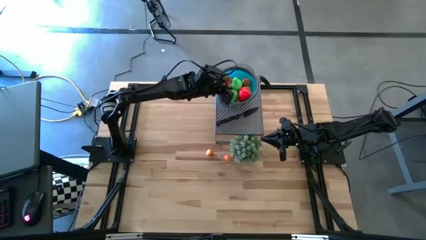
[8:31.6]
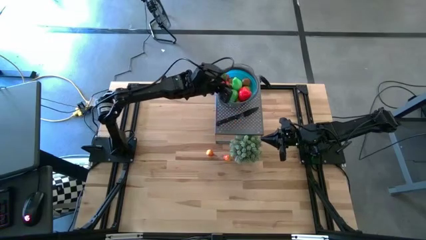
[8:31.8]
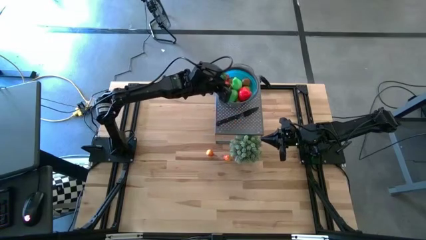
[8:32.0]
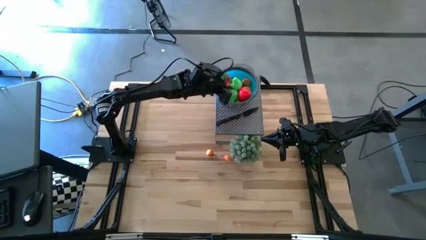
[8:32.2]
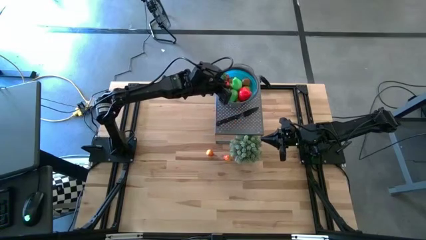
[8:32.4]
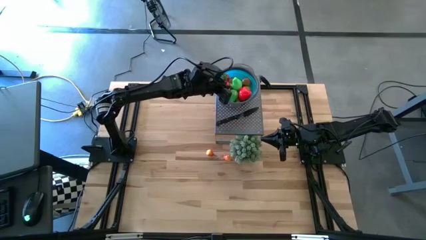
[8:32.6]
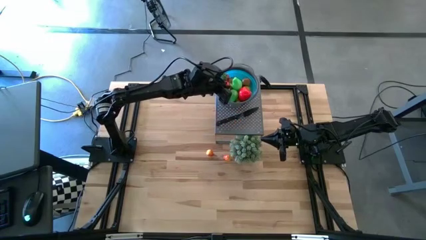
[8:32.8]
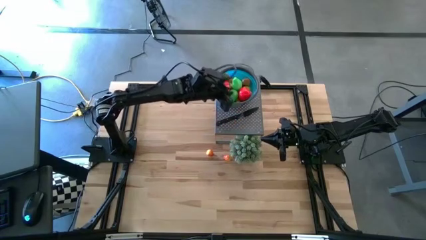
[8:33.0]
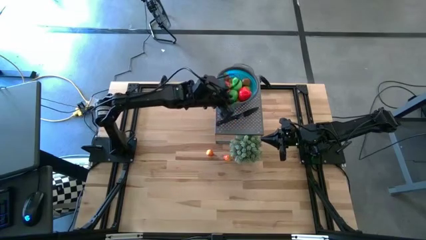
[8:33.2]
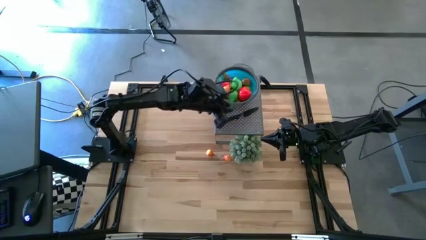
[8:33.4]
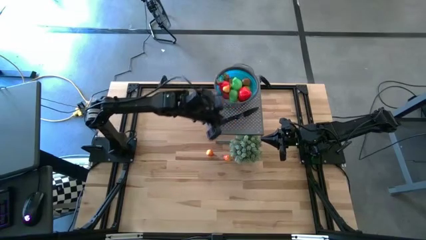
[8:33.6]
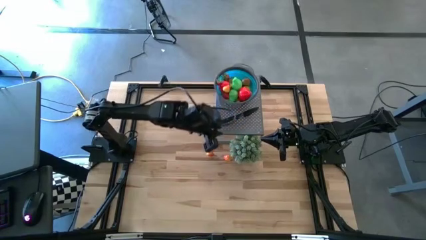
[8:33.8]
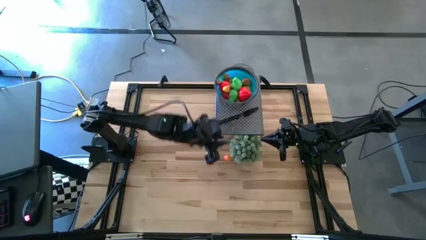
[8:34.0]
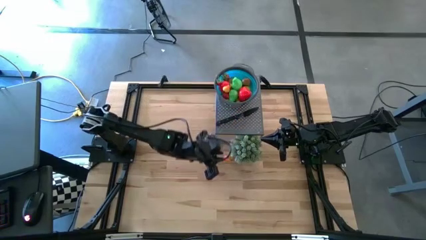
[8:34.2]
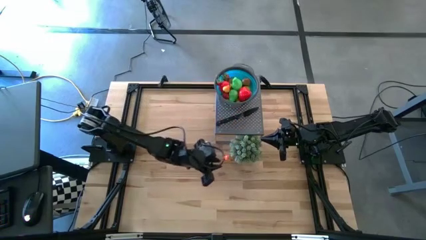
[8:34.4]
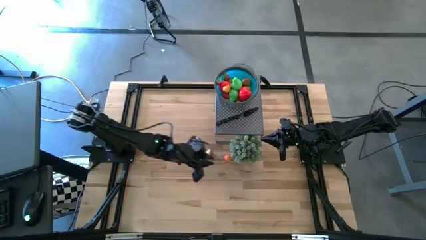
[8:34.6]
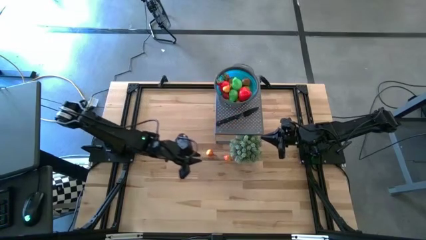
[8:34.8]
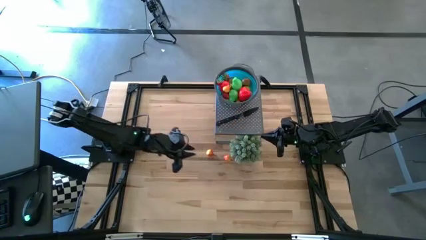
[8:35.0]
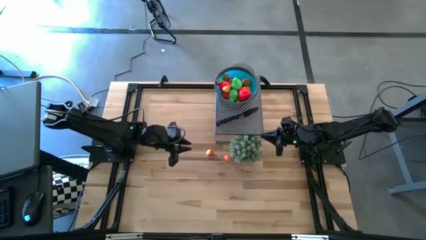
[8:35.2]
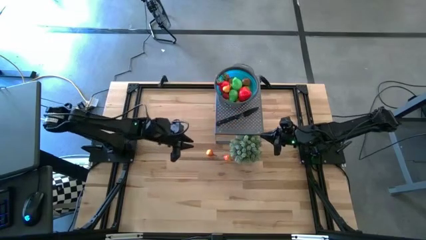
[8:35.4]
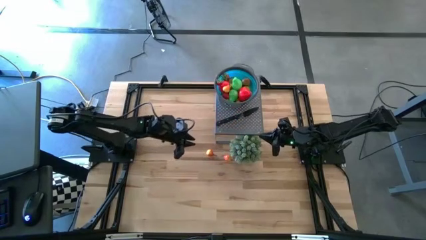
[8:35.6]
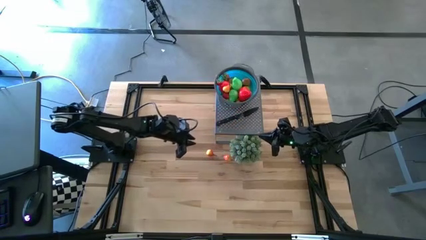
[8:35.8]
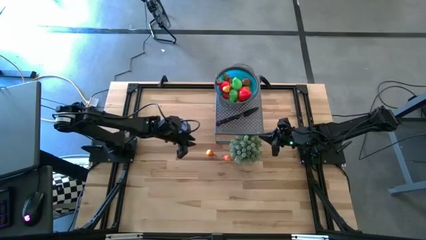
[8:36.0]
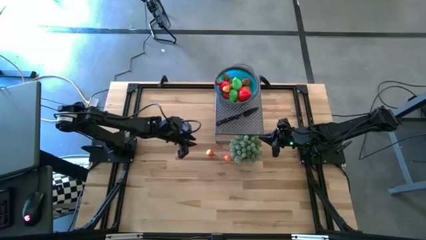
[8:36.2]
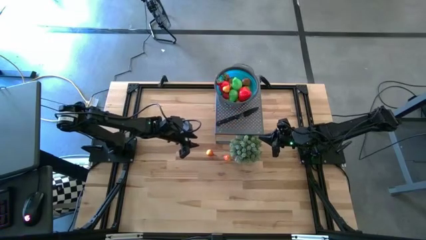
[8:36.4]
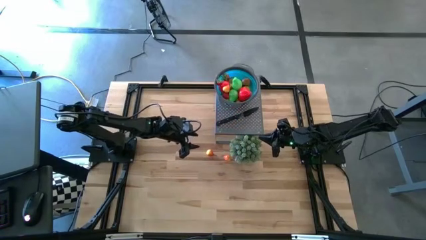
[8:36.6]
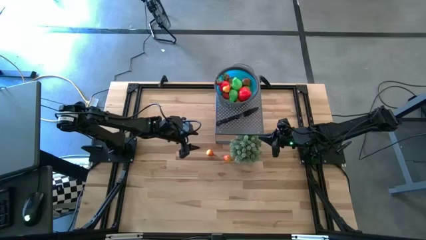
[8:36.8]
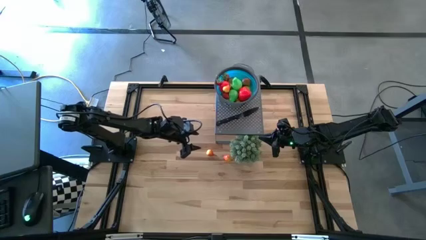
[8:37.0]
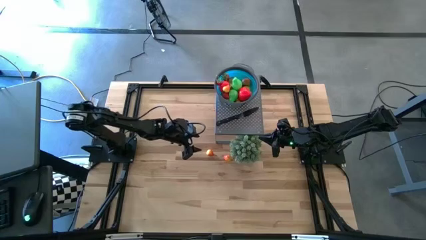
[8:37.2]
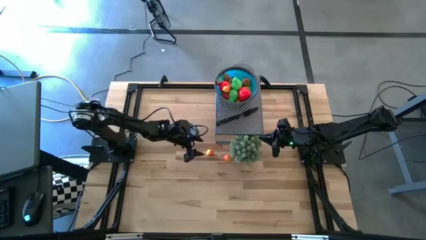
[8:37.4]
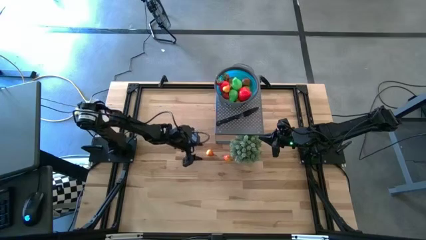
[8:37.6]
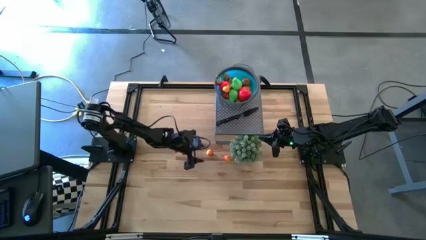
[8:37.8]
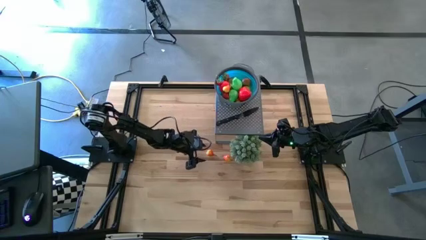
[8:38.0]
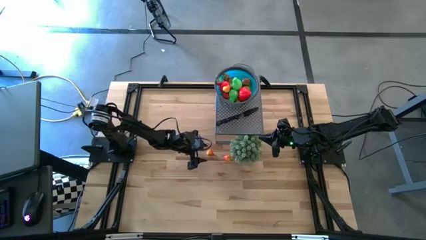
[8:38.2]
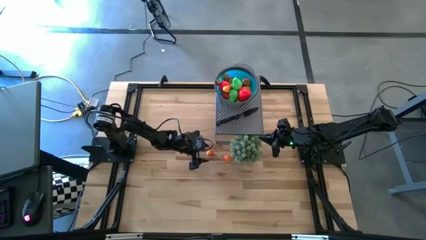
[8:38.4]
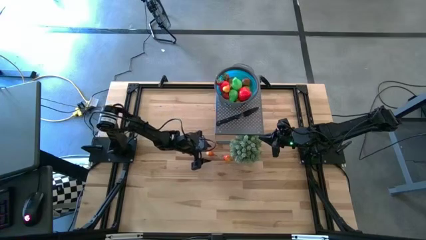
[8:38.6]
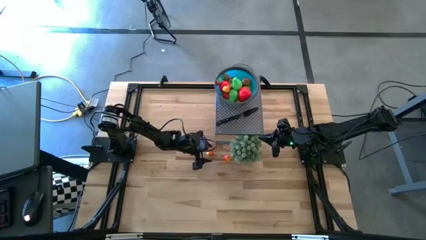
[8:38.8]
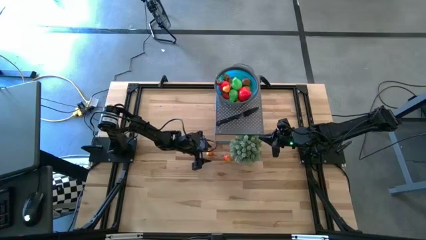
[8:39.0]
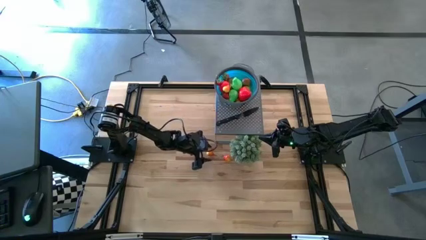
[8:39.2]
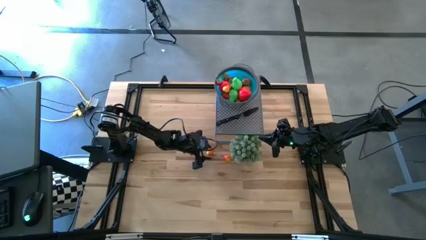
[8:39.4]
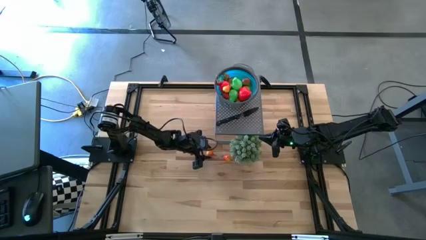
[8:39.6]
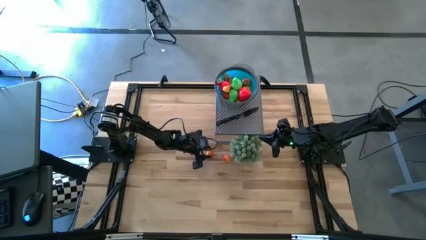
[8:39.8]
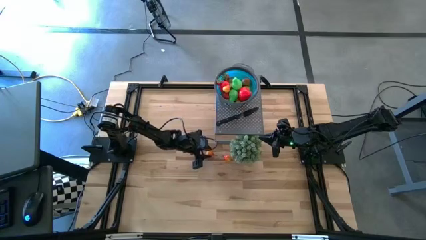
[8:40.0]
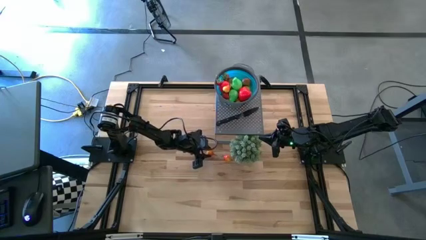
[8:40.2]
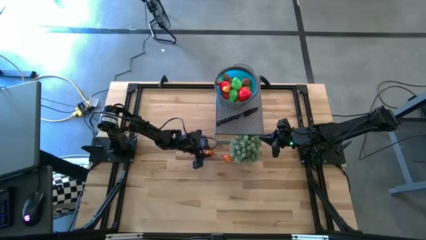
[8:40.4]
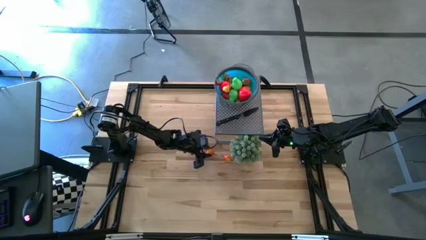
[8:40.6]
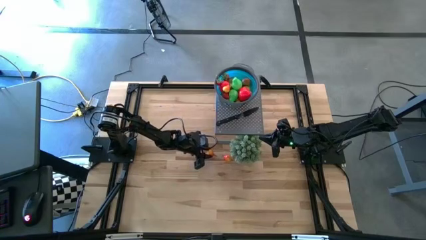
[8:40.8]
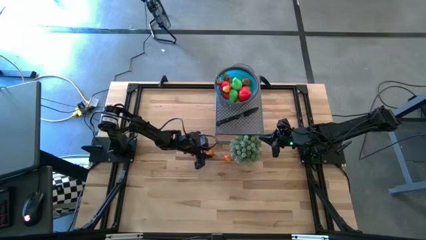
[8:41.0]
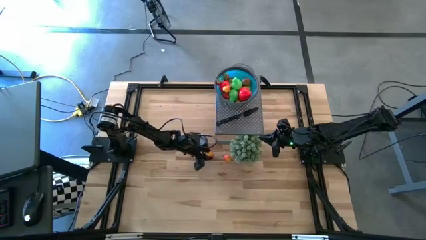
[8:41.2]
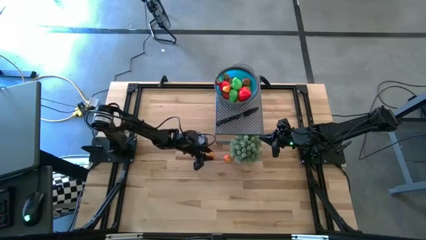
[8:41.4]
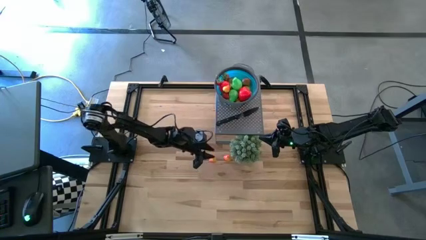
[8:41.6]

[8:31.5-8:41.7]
Task: Pick & Place Fruit
Put the orange pear into the blue strainer bowl

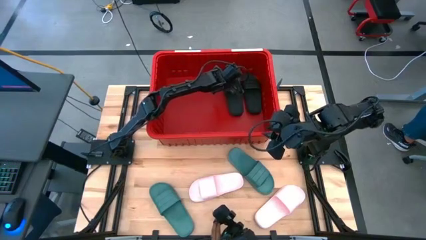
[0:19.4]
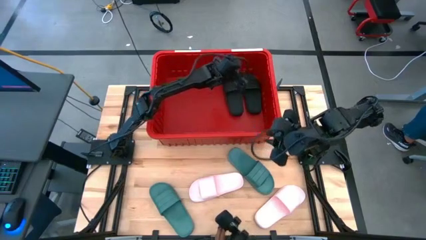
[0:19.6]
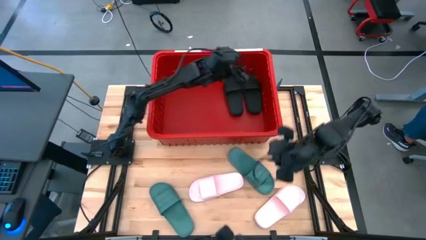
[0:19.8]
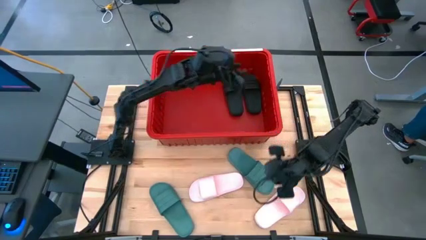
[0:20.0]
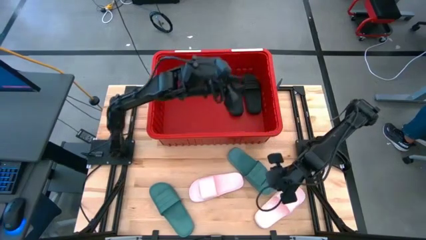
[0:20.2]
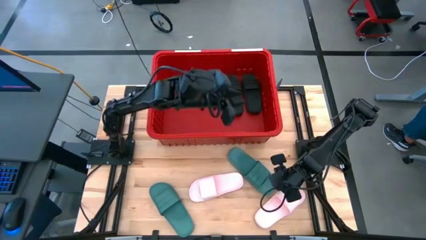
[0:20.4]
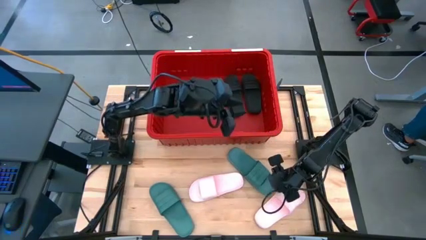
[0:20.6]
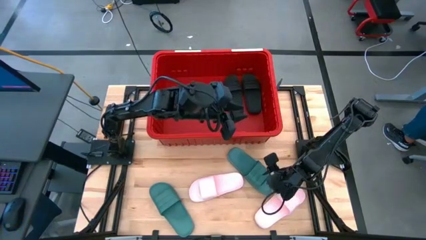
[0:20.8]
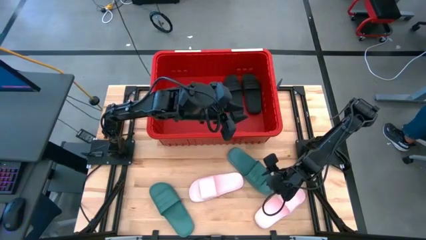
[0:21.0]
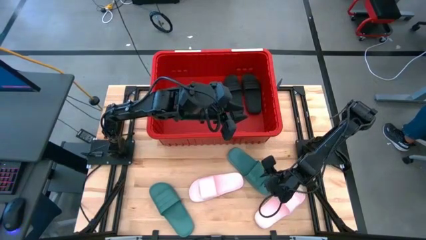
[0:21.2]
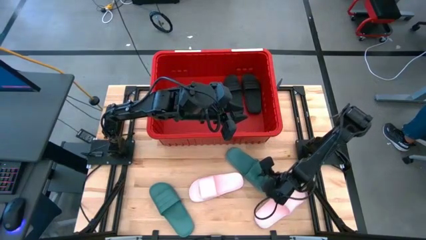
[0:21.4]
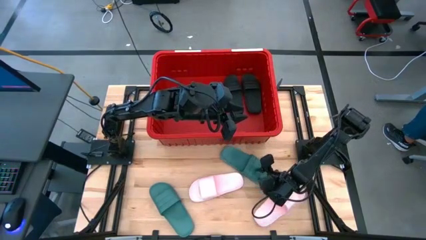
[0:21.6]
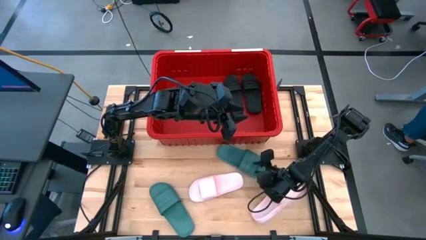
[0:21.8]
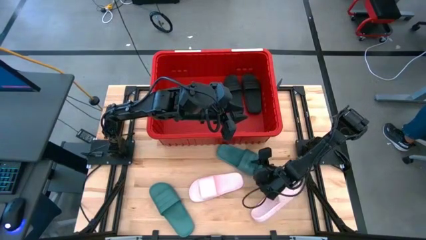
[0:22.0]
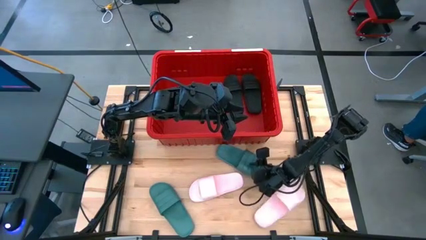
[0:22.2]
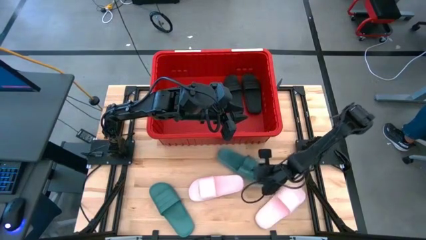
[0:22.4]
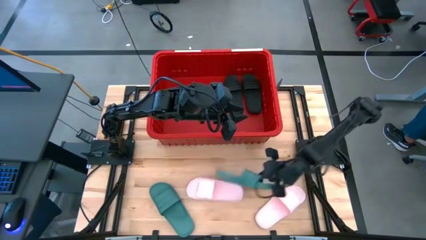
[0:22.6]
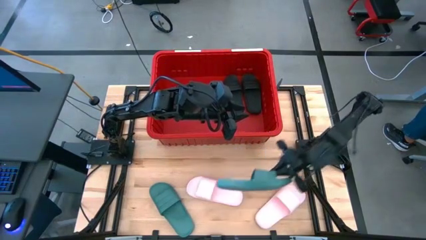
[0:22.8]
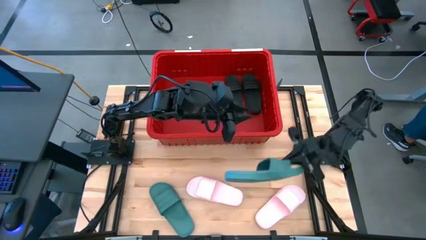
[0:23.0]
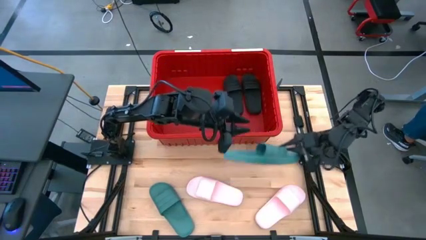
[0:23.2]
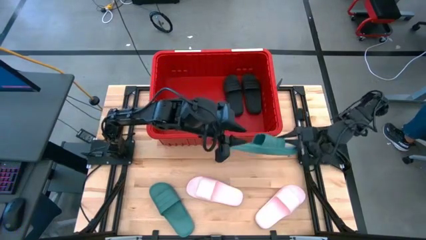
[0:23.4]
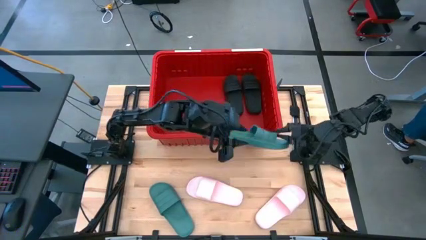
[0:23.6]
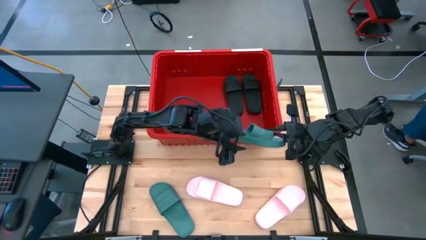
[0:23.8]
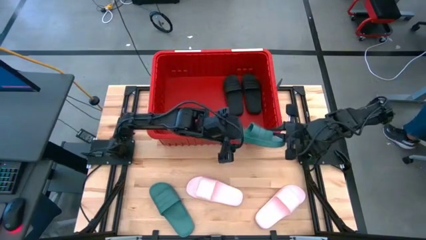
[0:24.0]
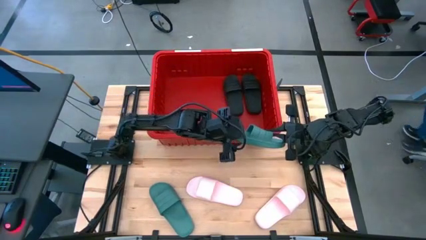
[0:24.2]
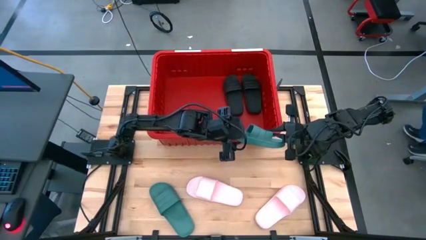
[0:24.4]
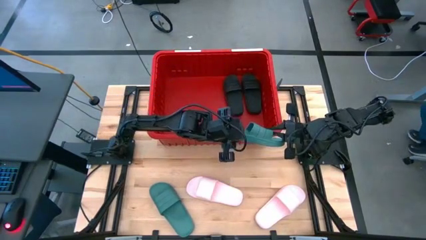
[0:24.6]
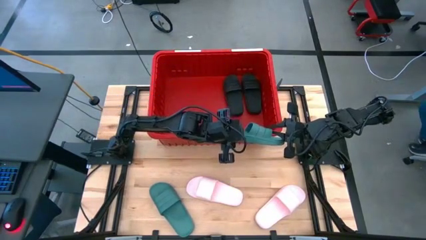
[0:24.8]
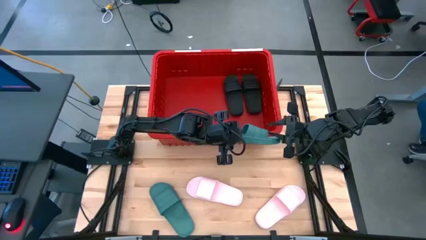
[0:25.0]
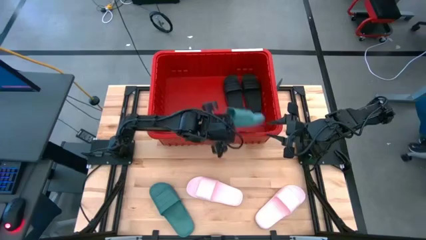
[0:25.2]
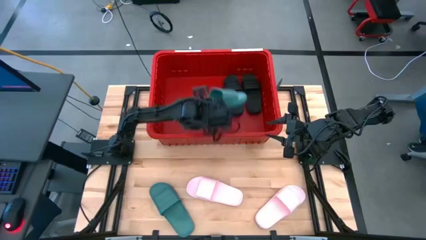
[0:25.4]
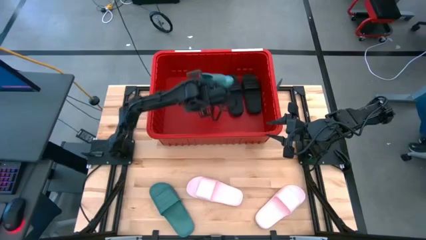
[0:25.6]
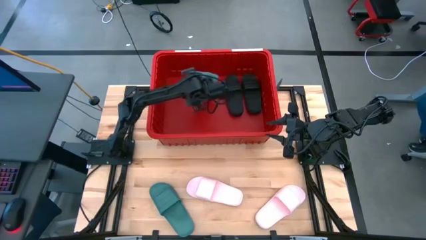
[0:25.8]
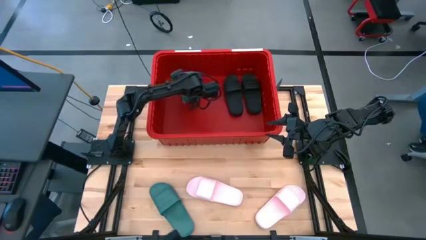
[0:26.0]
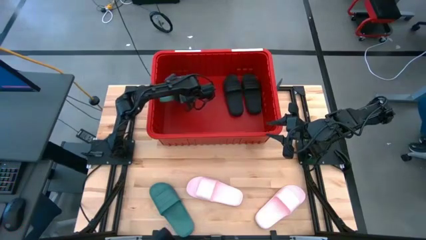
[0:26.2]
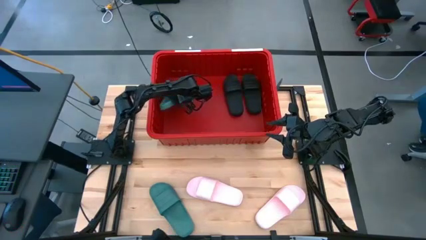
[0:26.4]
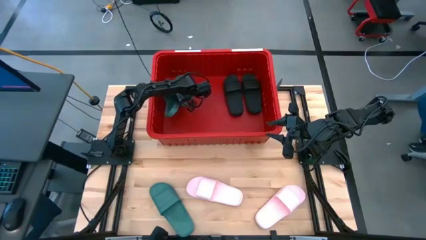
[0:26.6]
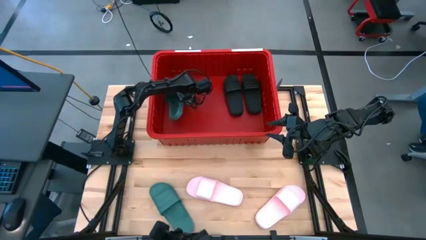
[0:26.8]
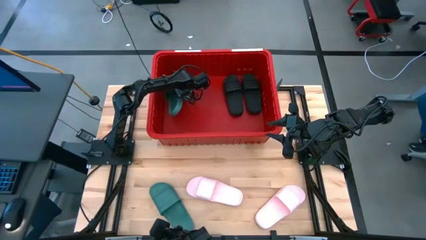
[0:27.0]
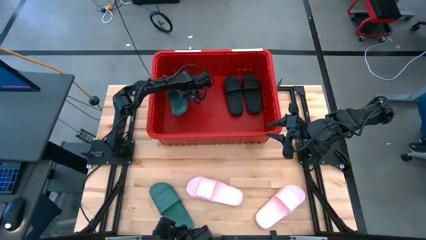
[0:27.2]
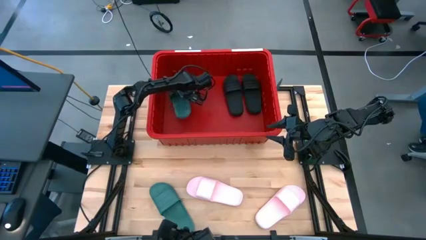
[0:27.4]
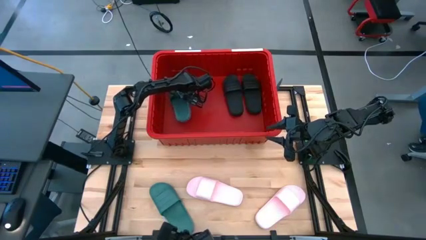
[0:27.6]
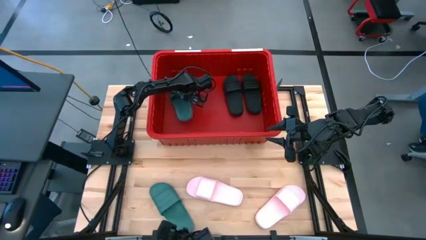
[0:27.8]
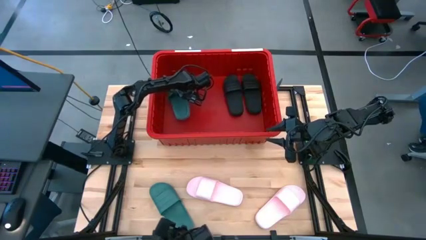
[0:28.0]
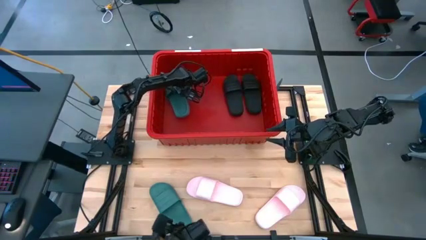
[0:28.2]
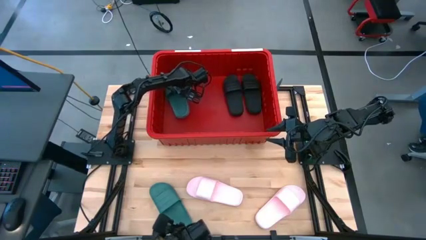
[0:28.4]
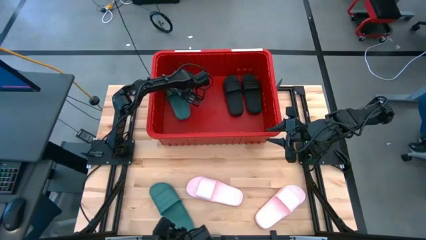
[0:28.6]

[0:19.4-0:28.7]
Task: Pick and place slides into bin
Put the right green slide into the container
